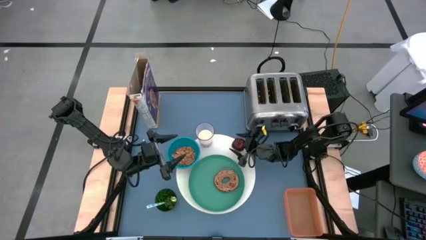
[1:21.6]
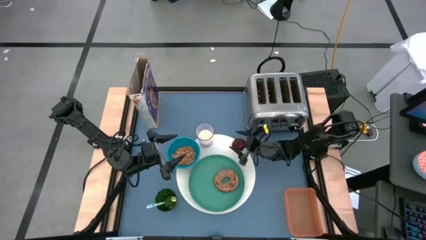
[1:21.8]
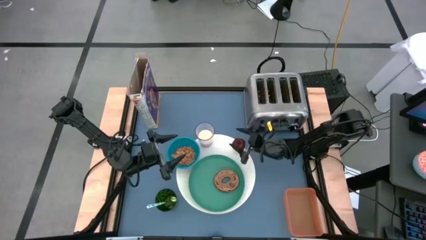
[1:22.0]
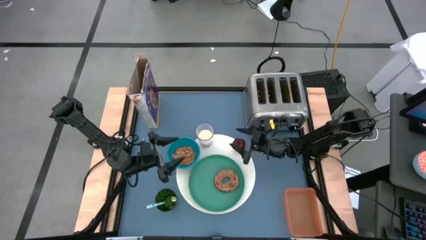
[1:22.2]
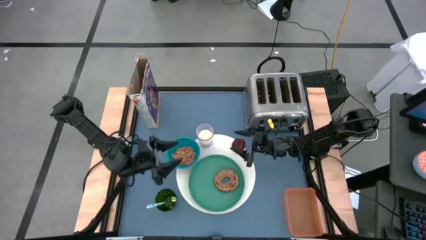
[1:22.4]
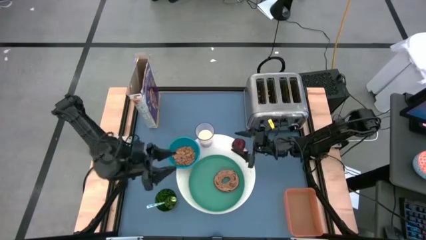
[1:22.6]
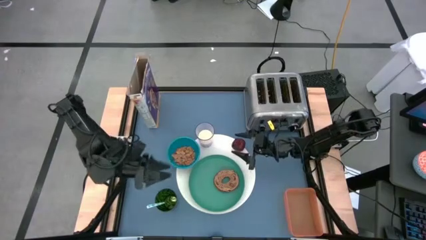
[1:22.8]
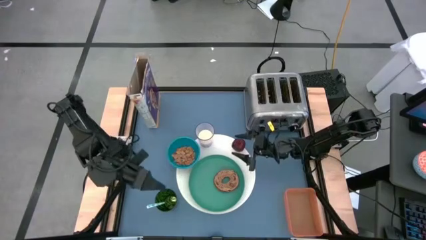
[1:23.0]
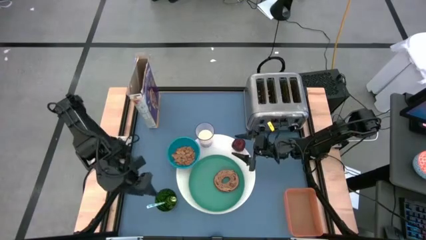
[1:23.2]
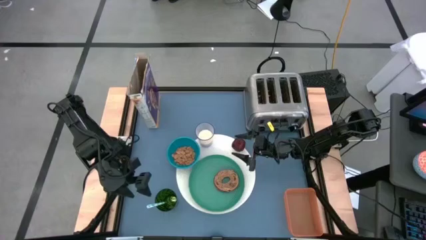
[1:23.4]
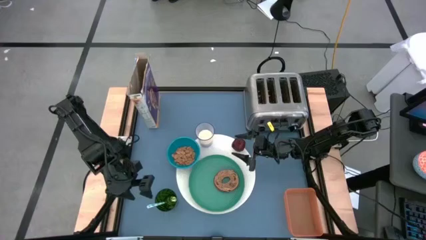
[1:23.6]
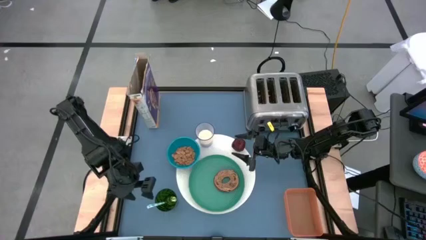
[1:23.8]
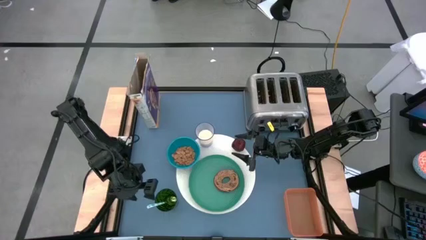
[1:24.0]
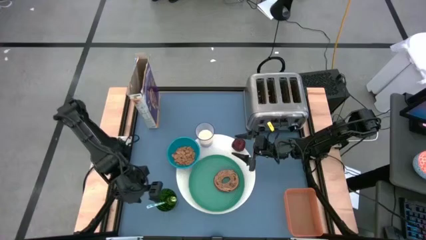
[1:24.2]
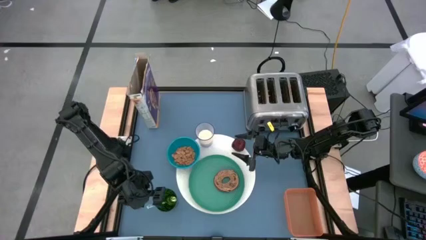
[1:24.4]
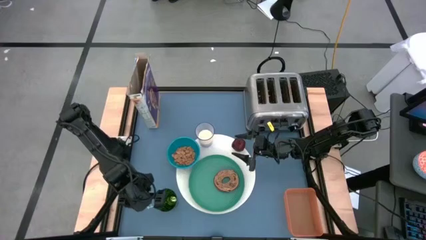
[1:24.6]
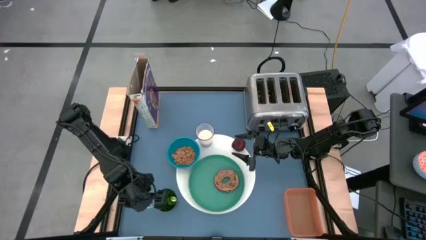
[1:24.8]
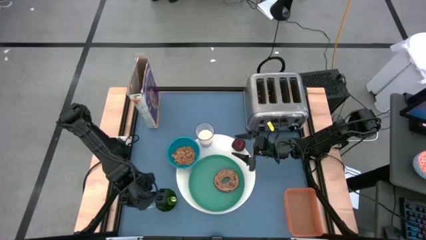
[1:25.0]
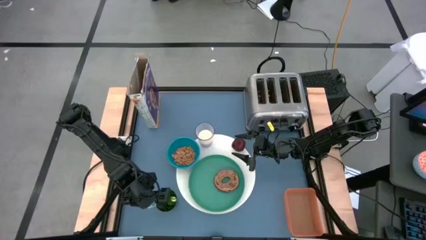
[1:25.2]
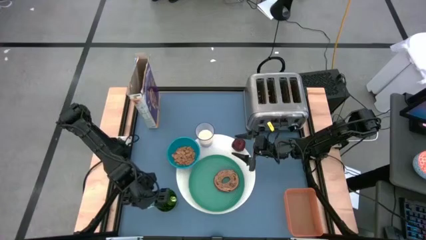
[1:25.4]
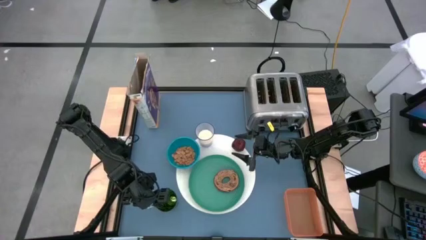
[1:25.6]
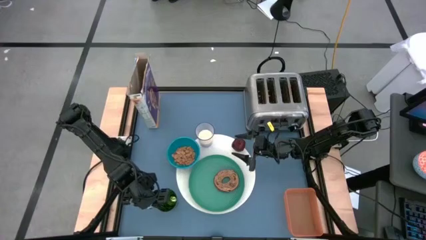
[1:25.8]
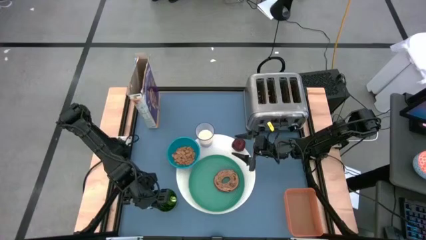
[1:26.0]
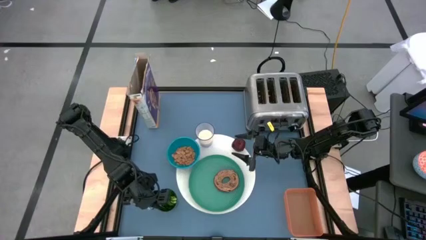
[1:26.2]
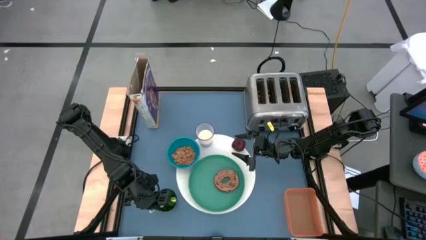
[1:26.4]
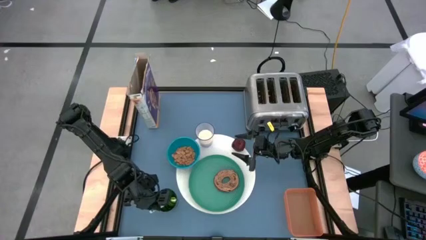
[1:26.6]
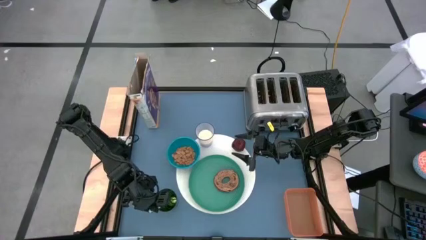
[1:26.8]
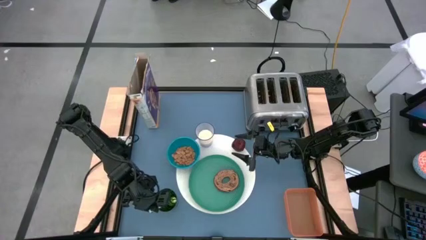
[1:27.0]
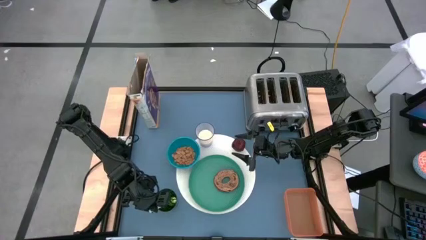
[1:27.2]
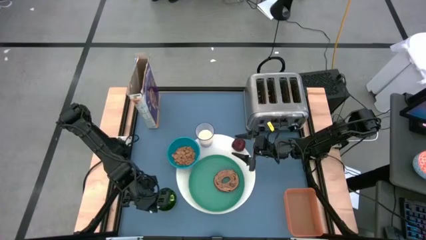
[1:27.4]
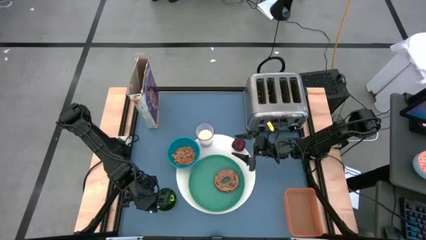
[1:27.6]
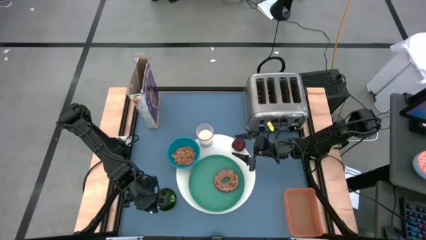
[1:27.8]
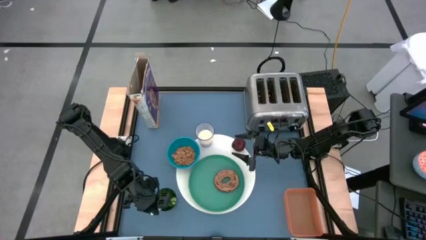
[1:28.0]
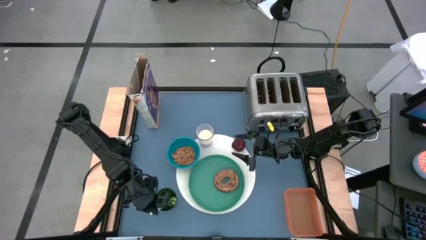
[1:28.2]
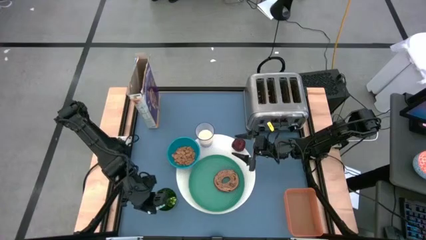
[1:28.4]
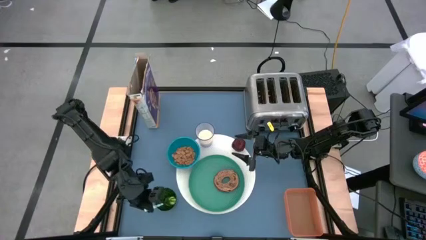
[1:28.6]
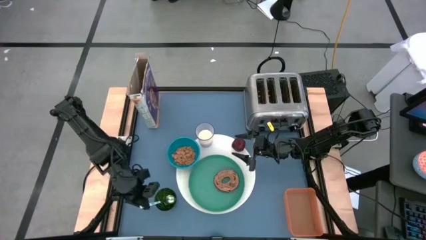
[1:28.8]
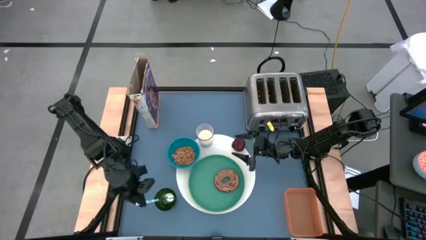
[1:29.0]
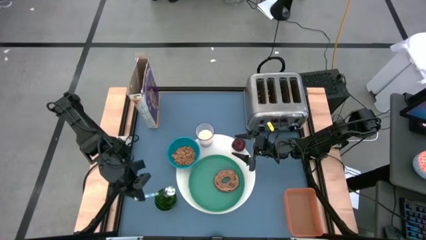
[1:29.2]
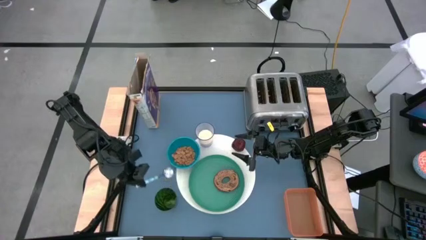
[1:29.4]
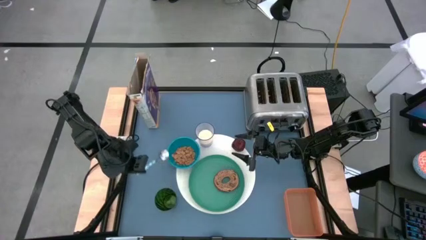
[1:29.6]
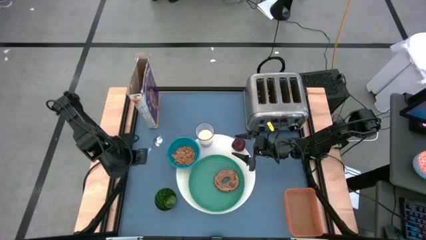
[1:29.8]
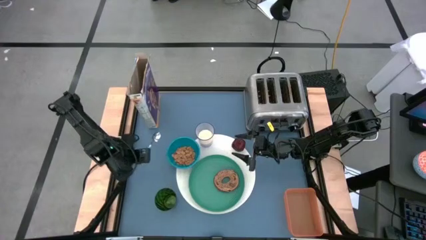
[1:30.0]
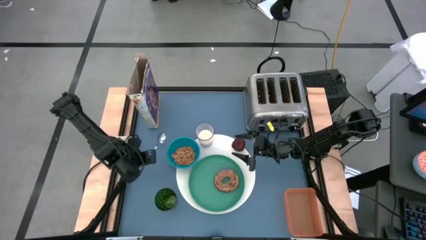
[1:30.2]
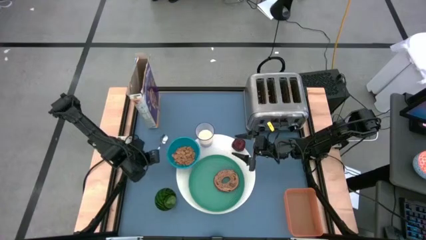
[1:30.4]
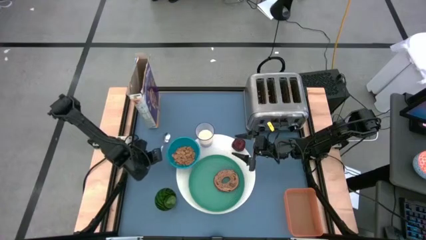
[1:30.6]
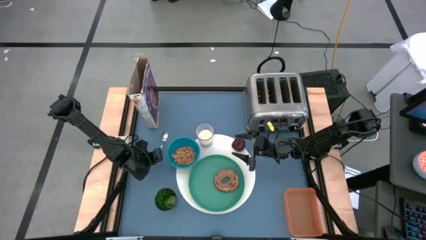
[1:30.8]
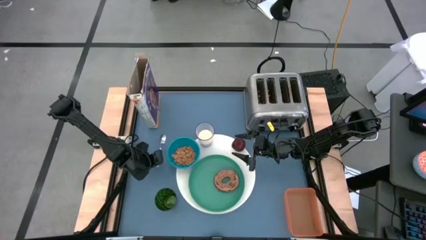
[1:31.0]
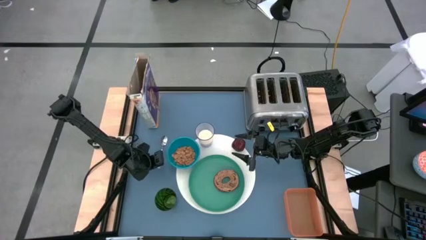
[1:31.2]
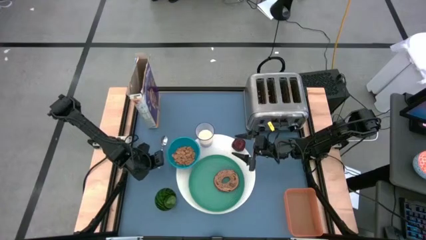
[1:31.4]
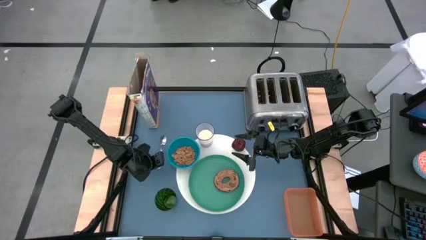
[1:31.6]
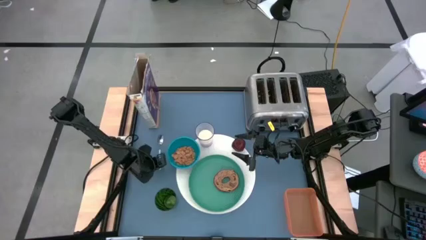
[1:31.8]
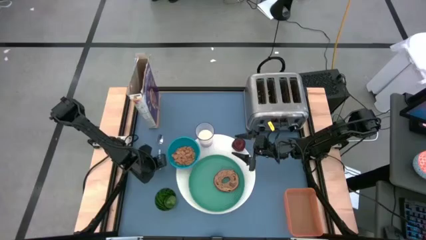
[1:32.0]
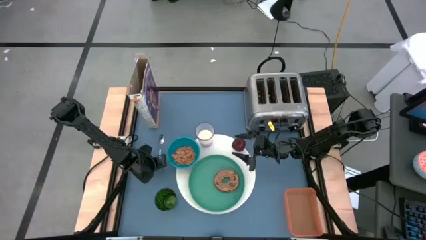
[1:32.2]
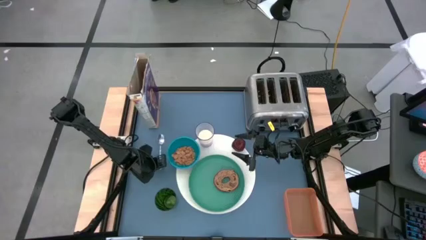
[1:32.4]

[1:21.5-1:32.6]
Task: Arrange a breakfast setting
Put the blue spoon to the left of the blue bowl

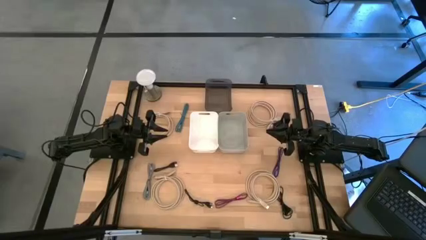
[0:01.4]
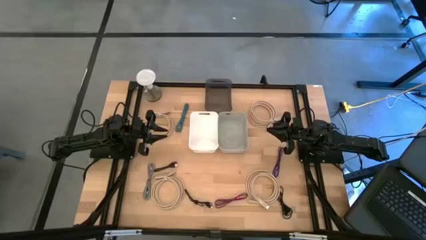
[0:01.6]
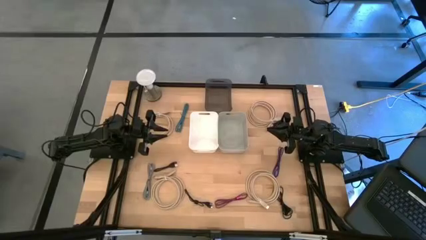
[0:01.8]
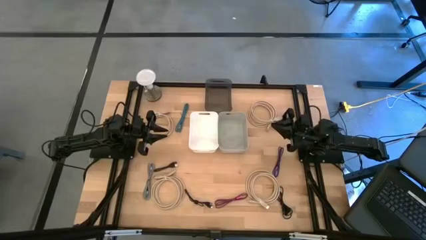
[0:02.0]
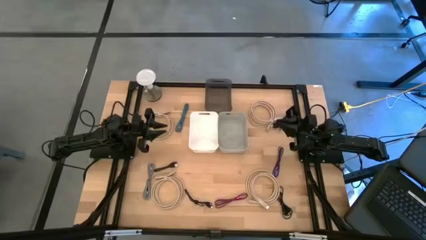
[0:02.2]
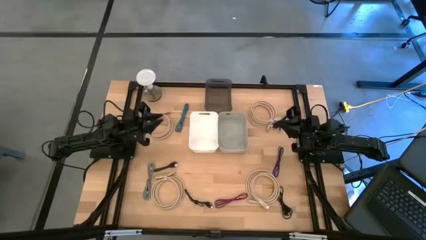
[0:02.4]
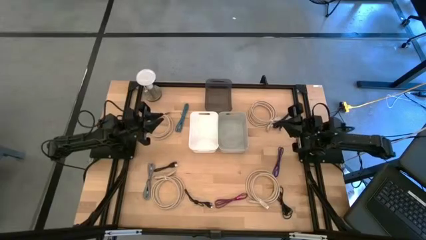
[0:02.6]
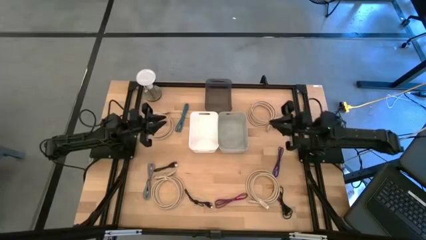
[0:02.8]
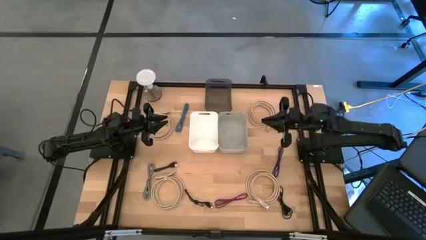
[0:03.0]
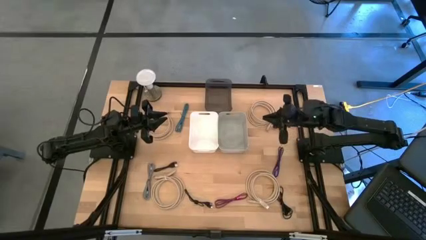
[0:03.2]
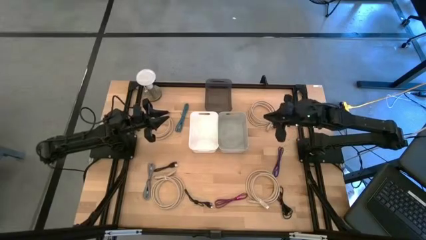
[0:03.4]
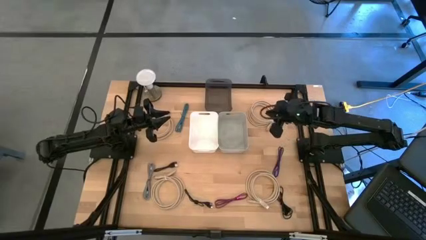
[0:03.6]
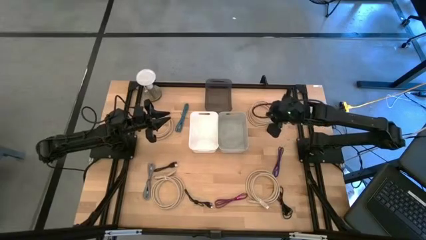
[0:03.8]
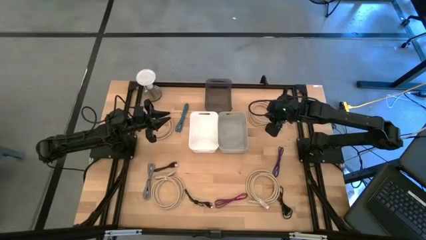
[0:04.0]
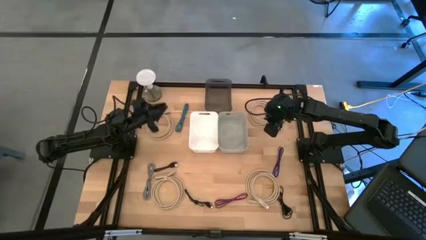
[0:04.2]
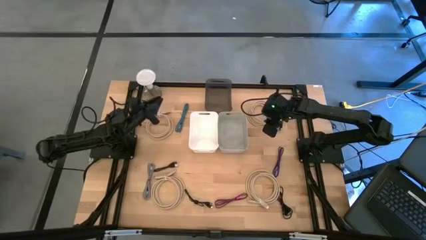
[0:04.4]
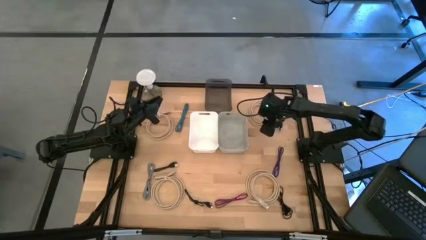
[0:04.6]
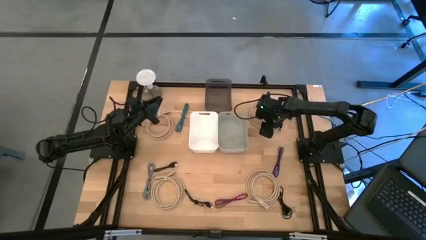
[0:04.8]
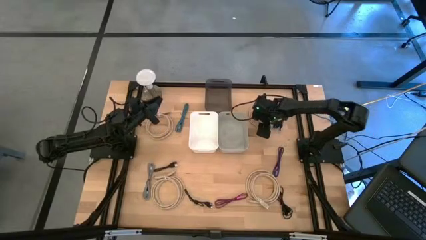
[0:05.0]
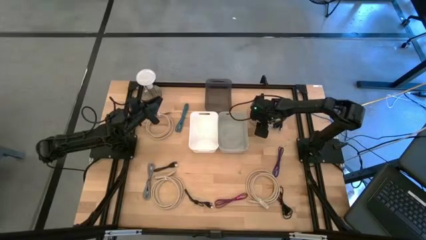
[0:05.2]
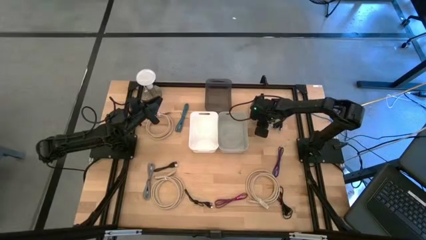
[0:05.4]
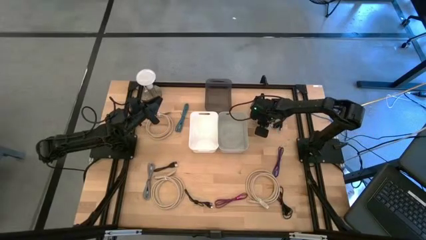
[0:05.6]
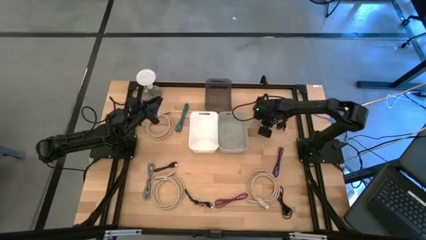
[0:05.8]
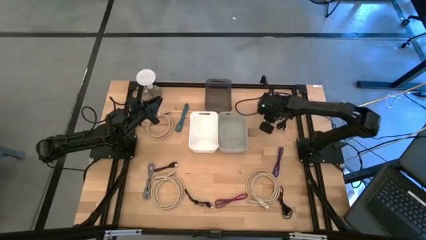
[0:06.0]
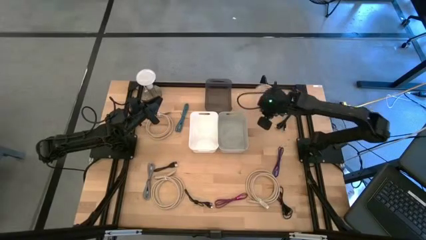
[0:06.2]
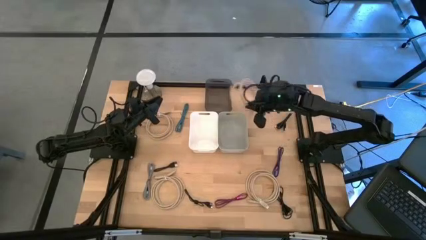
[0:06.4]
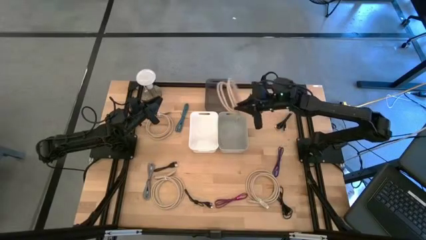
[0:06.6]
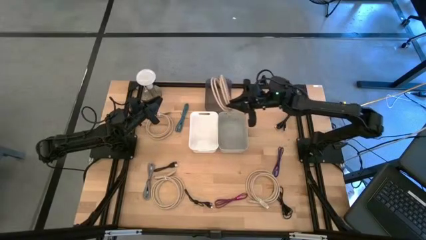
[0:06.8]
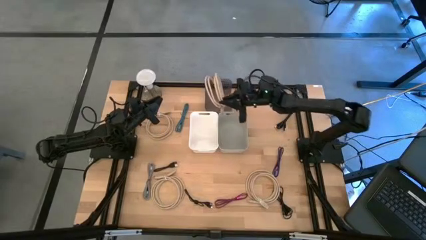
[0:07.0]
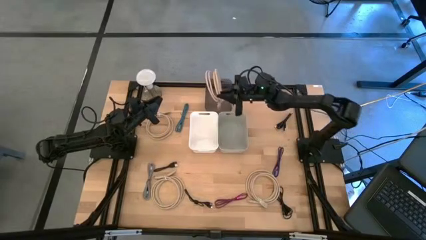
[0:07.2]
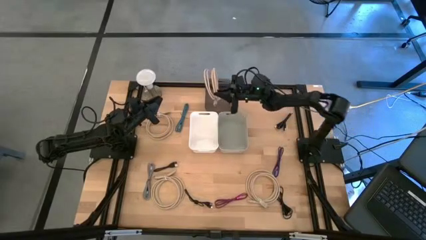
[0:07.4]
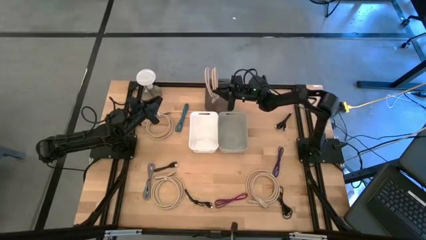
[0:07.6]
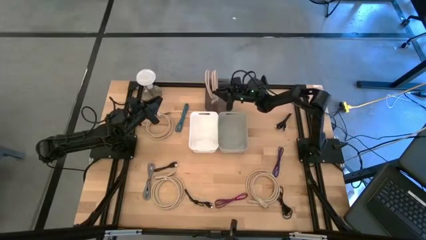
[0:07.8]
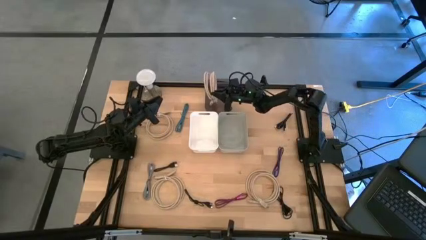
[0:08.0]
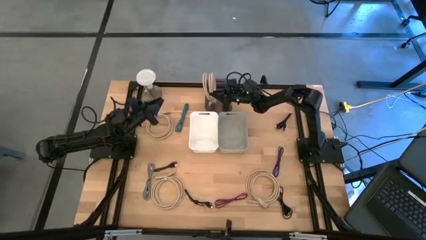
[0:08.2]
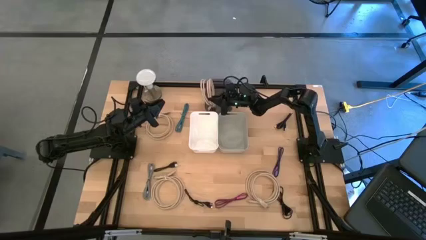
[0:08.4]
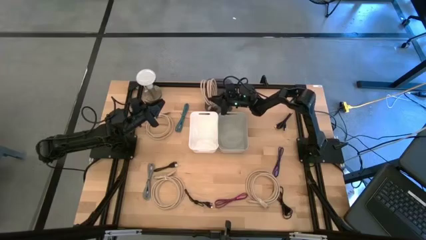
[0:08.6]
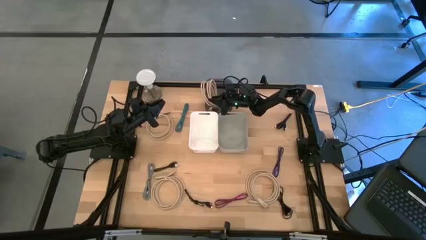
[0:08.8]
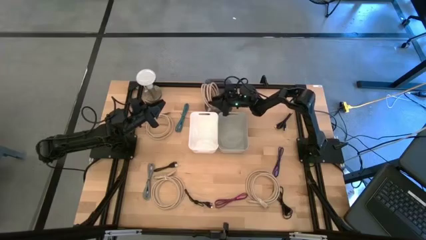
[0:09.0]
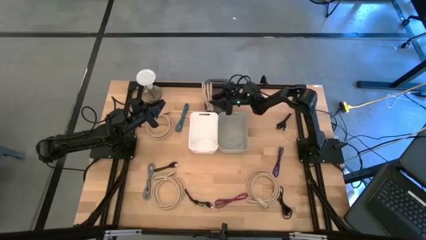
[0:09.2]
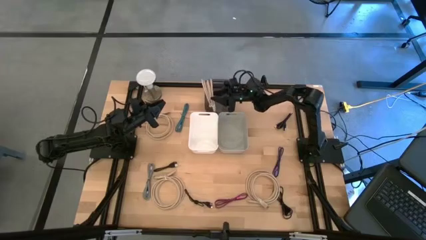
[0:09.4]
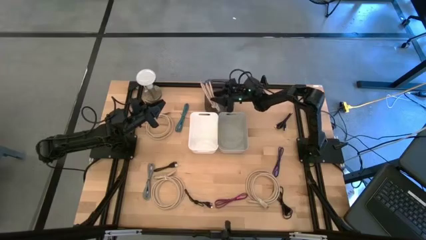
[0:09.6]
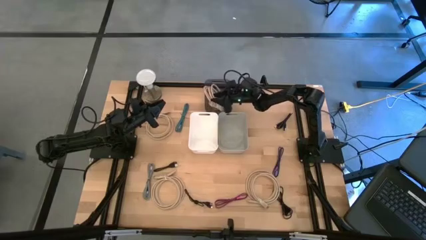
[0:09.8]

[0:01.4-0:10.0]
Task: Pick & Place USB Port
Put the light brown HDMI cable into the black bin
